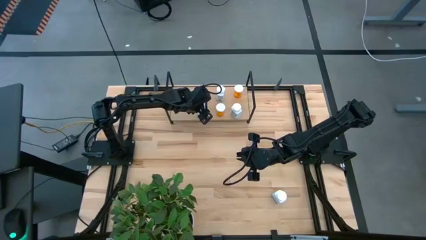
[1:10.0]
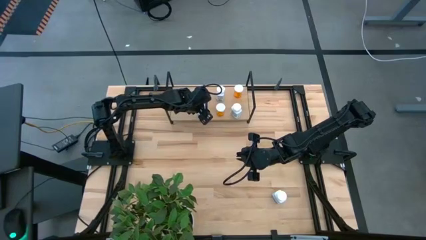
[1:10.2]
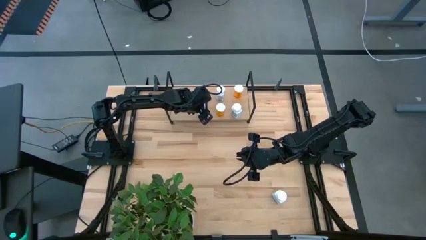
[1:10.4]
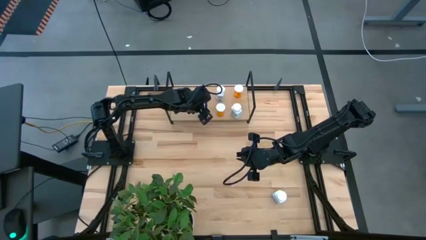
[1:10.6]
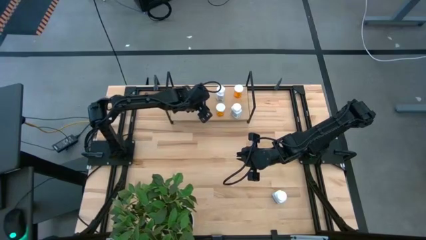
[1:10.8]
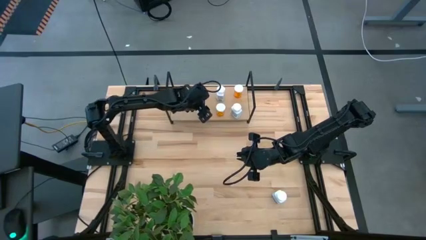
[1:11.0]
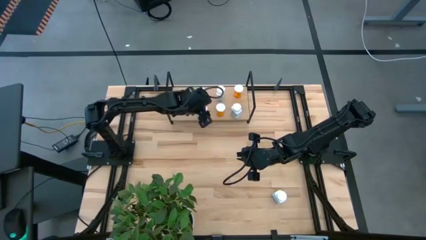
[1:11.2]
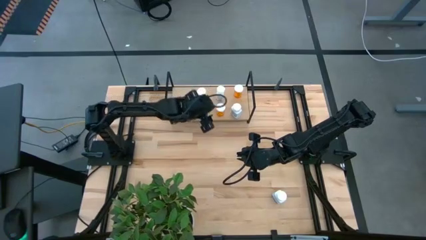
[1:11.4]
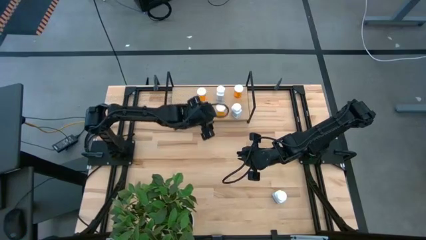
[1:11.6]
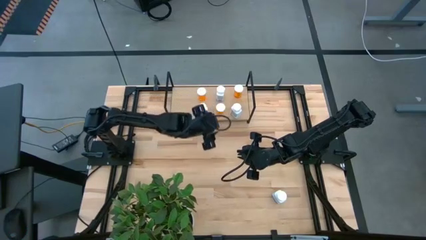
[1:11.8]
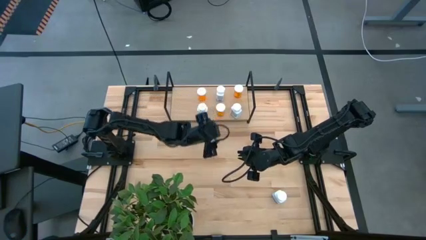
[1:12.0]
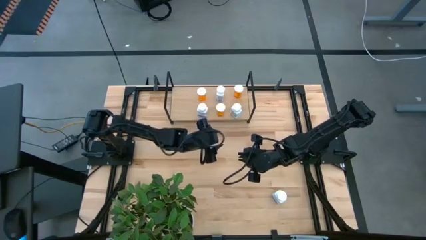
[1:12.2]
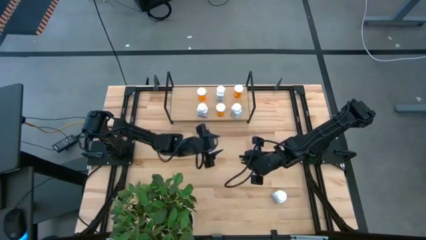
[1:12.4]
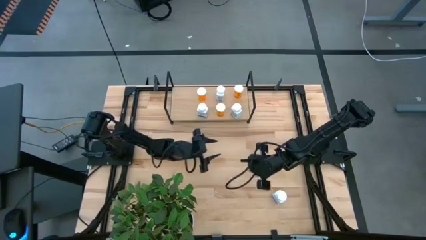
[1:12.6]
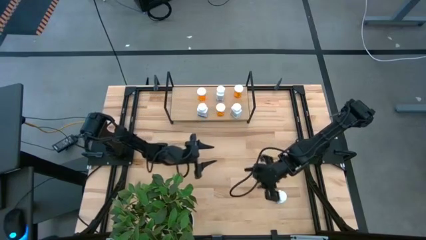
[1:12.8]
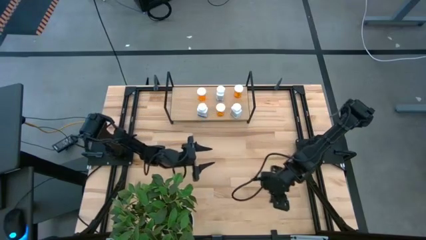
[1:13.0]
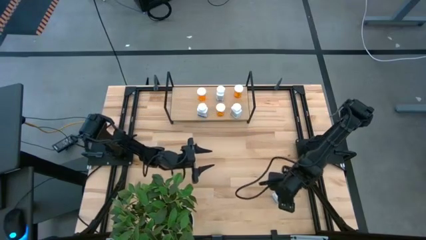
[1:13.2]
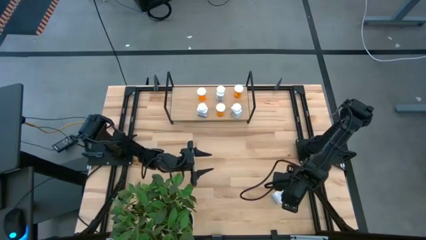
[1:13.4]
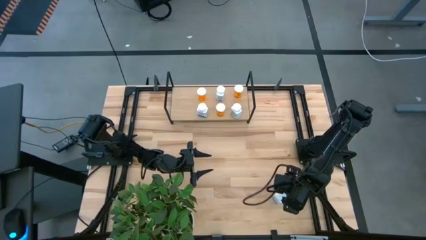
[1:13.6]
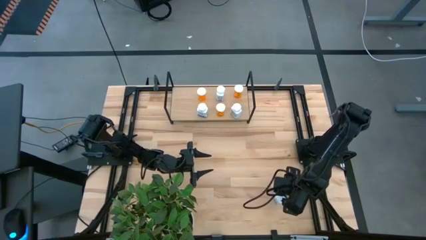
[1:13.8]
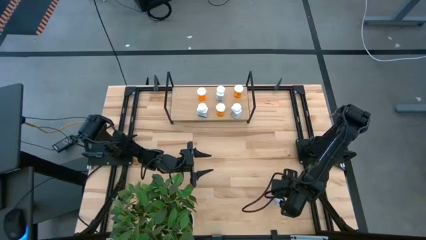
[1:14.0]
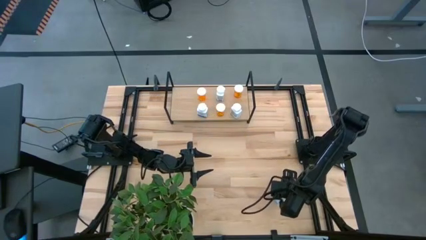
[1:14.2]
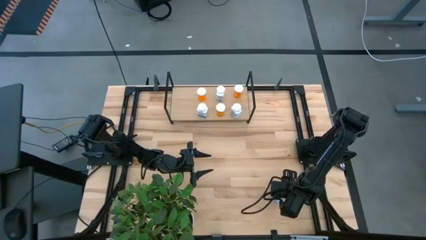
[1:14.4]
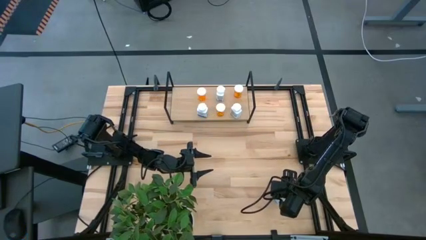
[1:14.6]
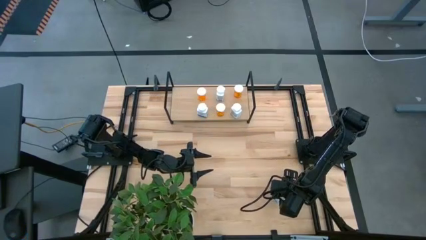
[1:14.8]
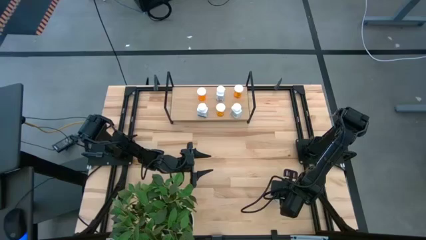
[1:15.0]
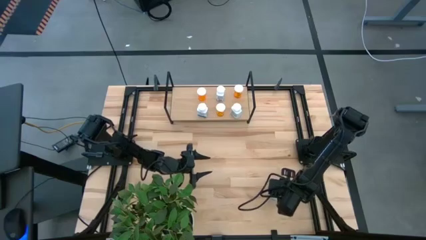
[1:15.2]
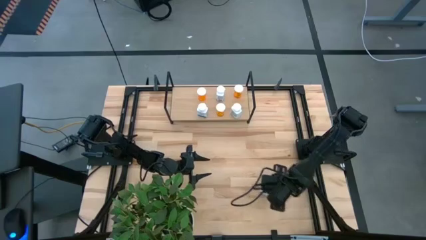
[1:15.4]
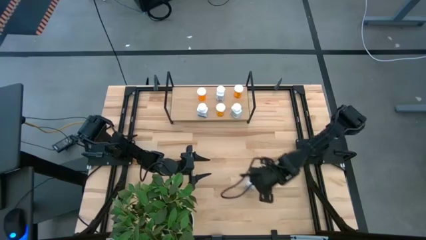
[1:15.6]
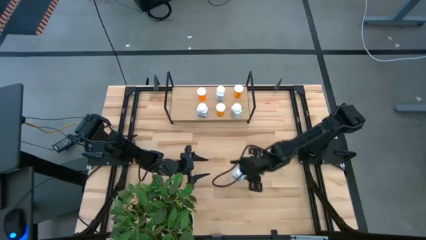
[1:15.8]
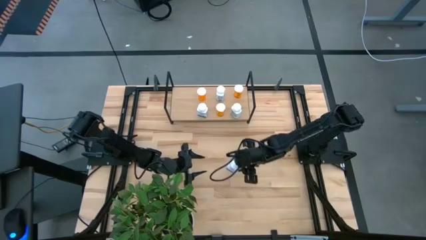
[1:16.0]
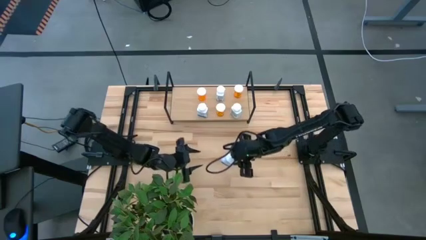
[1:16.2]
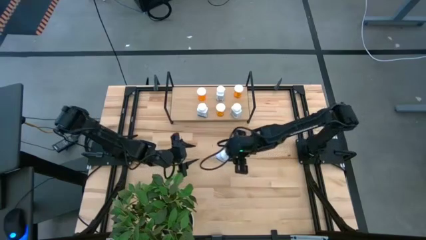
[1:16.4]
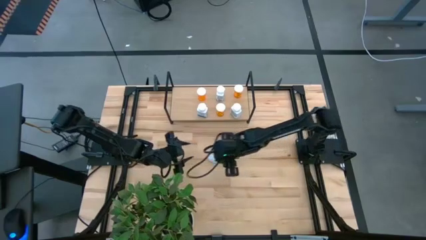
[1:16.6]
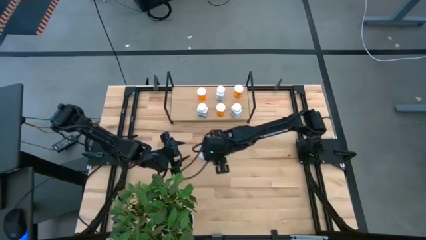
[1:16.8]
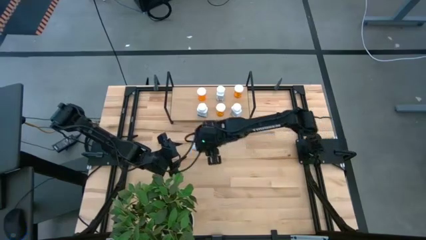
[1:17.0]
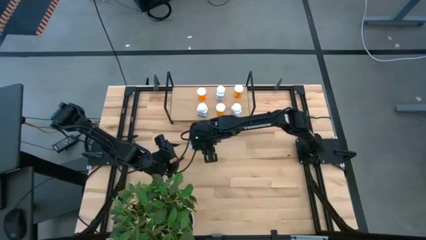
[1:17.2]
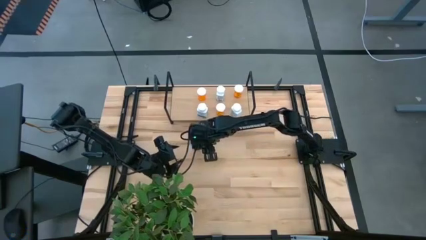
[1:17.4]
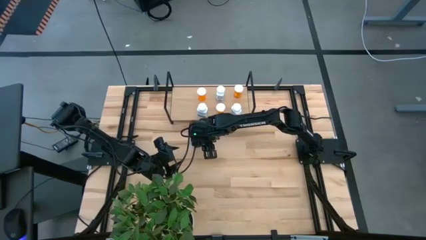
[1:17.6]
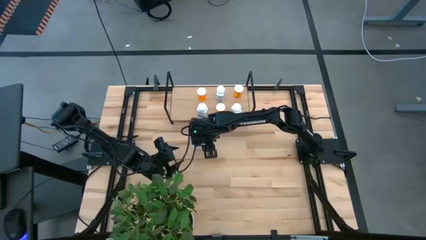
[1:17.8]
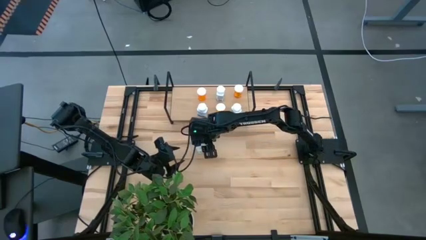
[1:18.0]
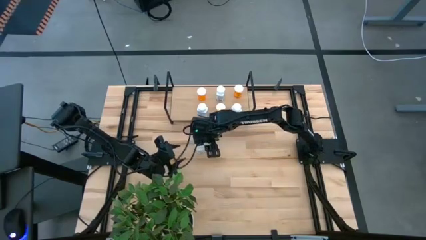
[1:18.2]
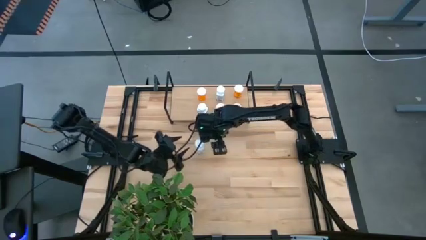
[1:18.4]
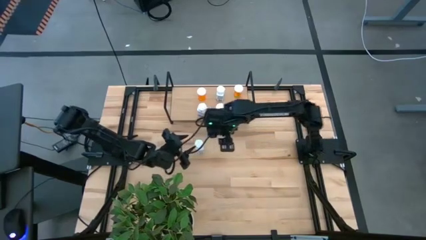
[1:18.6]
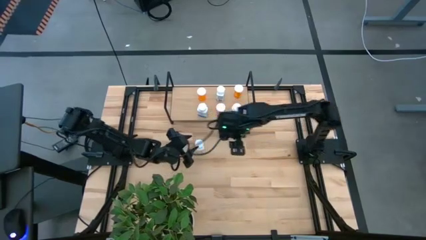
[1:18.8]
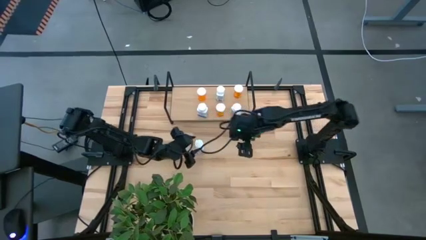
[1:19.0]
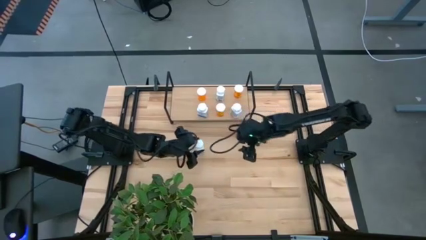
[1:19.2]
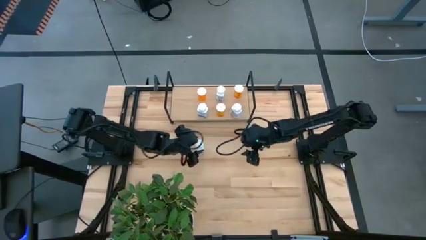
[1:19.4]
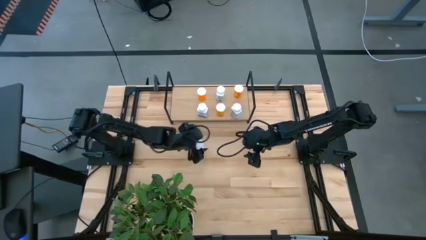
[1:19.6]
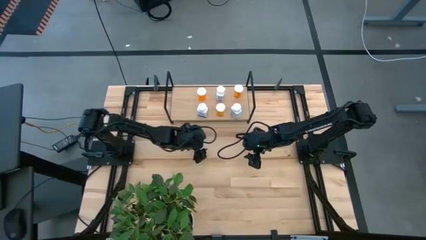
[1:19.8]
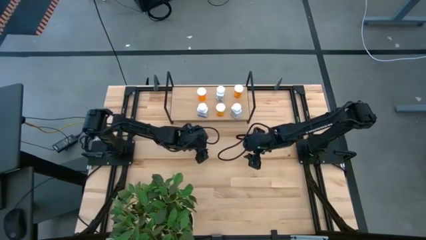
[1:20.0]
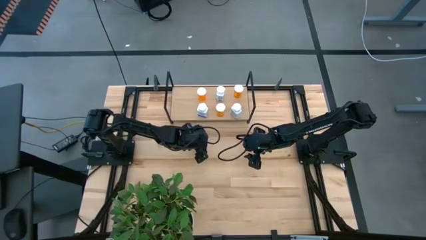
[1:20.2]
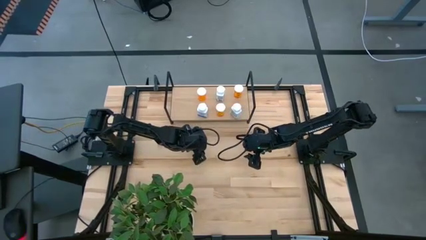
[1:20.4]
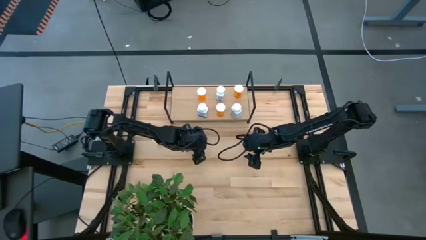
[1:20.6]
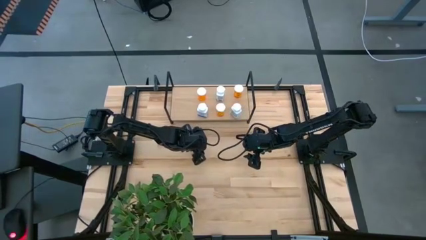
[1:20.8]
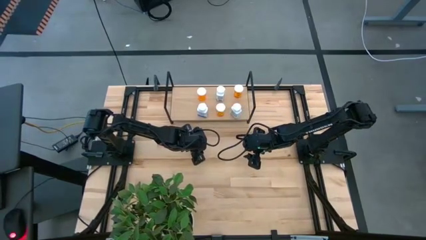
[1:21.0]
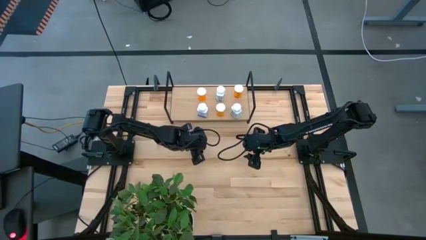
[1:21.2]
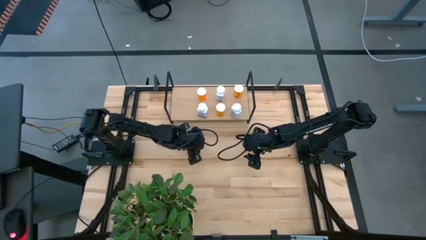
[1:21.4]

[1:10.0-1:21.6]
Task: Pick and place medicine bottles onto shelf by color
Put the white pill bottle on the shelf

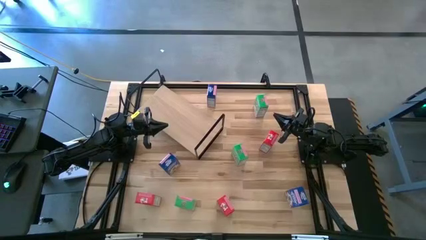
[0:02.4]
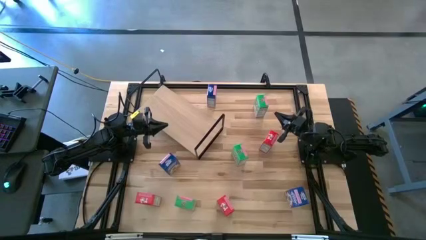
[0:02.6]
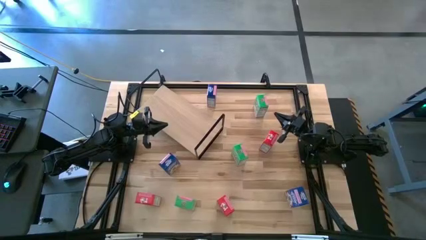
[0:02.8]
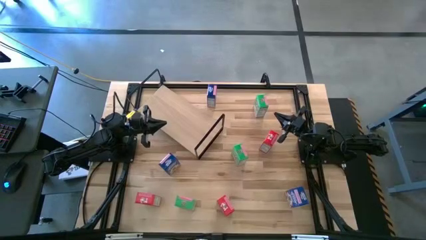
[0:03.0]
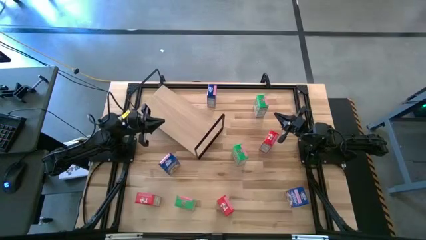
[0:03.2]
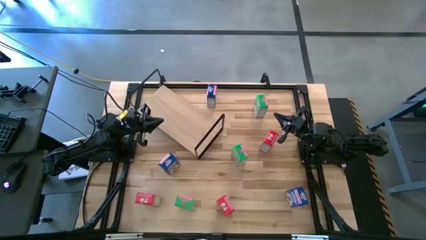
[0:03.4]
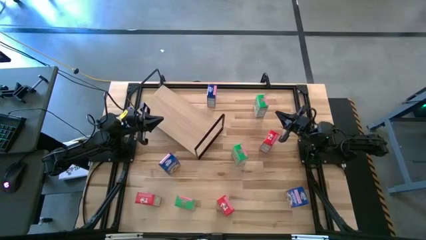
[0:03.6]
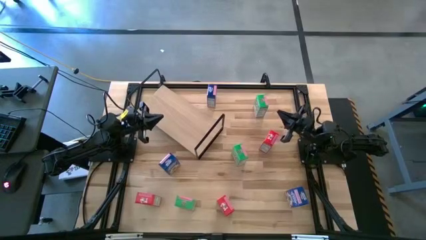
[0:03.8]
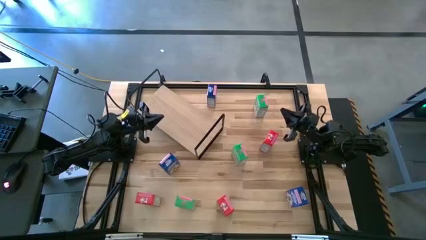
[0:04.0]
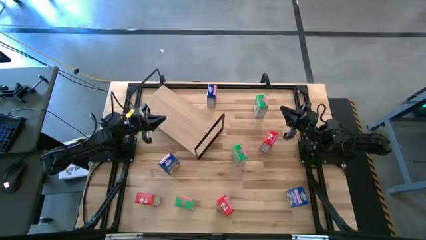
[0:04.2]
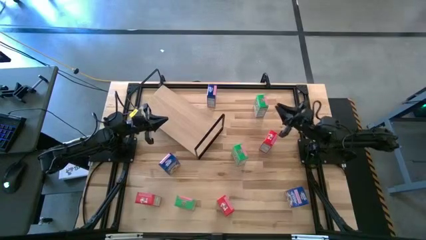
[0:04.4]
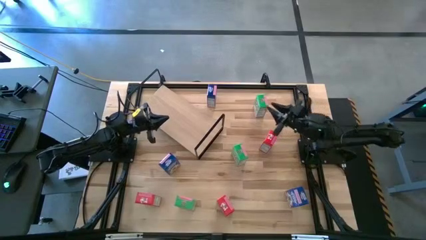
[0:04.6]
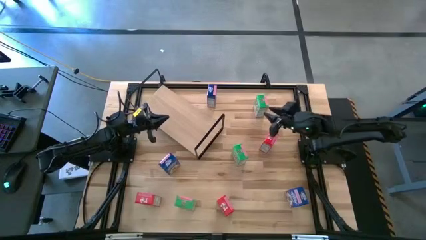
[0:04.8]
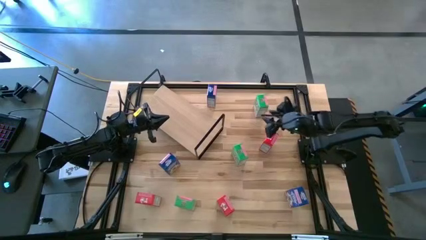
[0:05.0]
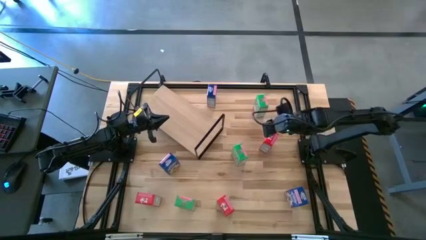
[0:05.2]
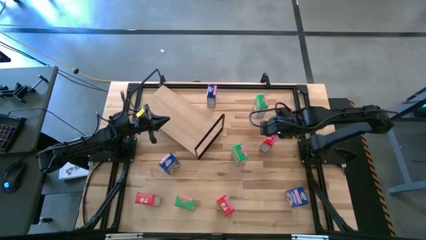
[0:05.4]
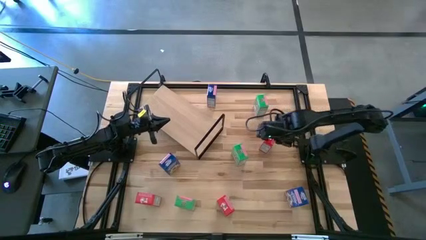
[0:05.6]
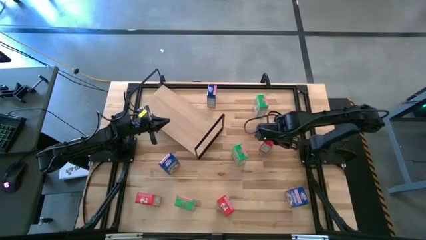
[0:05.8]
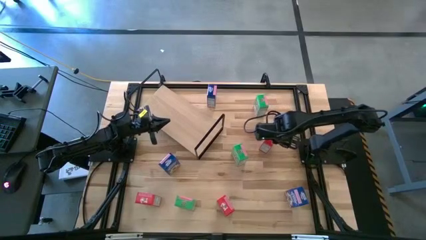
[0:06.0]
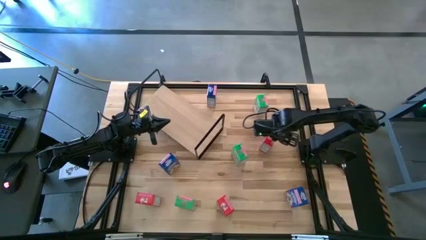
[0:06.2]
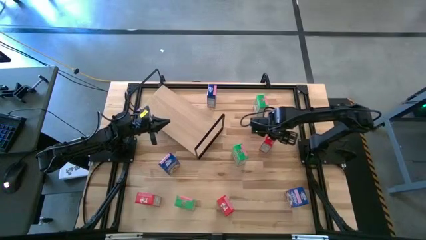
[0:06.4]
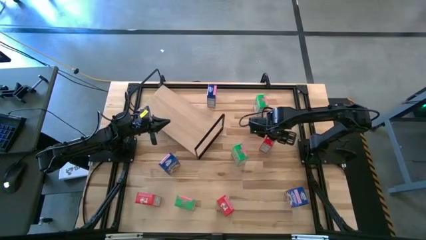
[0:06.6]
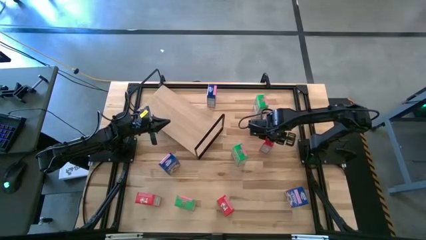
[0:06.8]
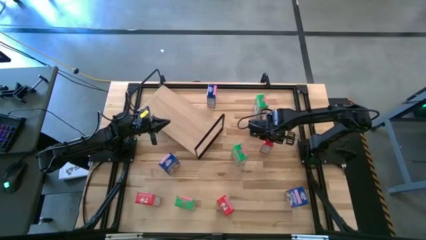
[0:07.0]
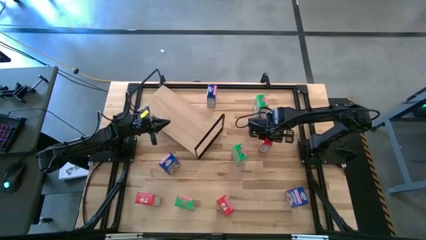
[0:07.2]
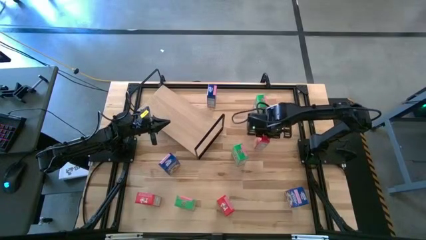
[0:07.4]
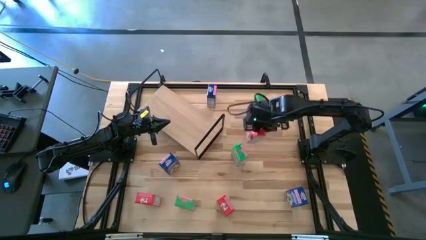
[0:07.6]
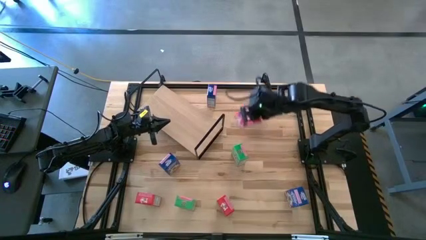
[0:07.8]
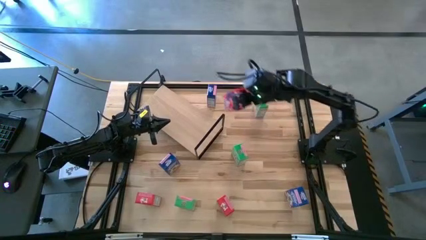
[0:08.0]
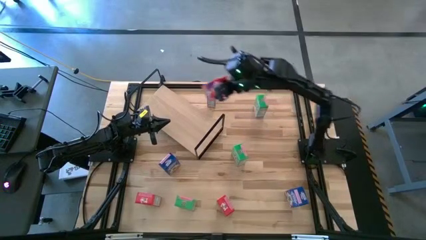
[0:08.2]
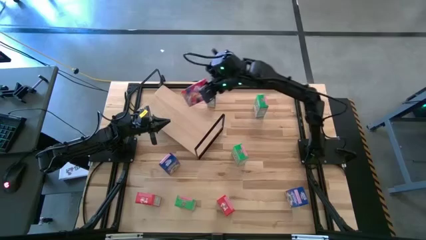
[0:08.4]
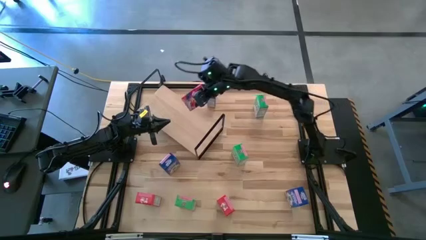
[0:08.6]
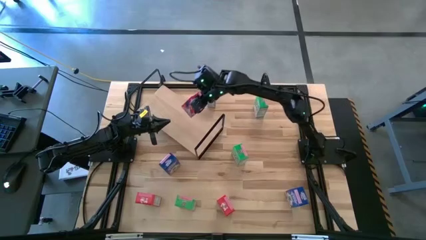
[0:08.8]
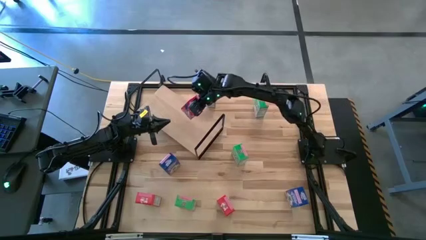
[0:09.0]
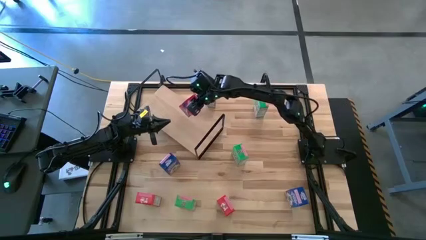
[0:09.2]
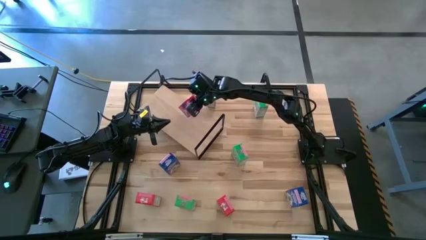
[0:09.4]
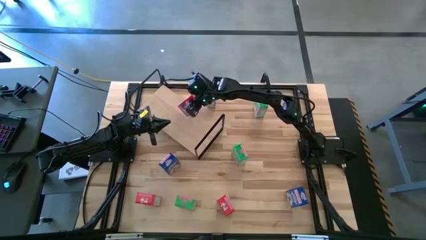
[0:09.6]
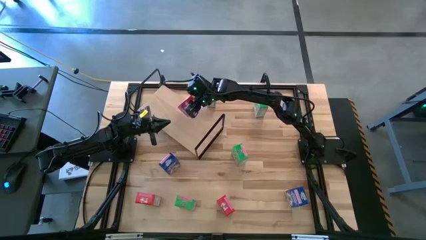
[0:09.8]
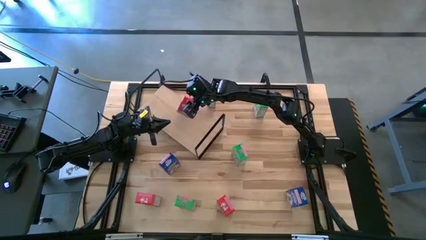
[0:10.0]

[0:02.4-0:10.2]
Task: Stack cereal on shelf
Put the top red cereal on the shelf
